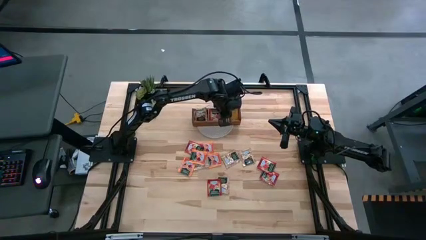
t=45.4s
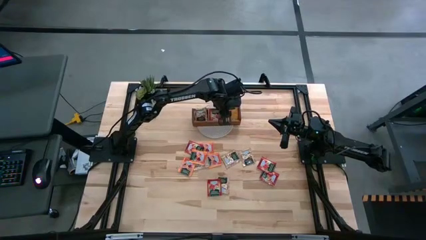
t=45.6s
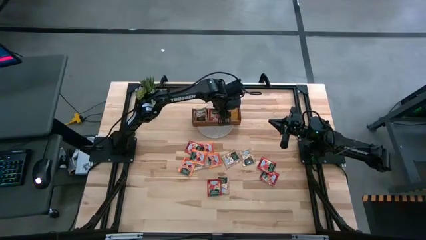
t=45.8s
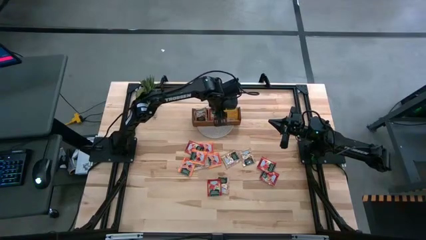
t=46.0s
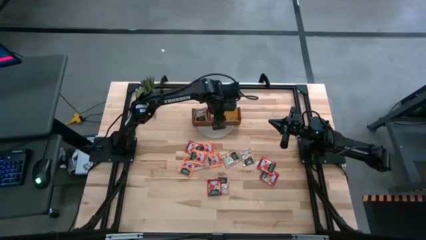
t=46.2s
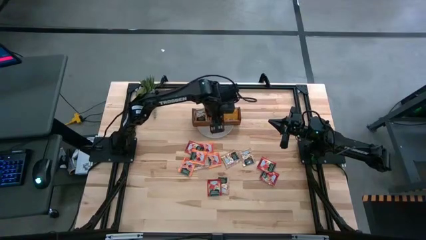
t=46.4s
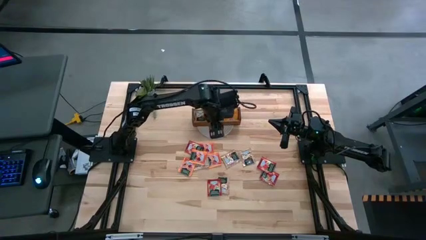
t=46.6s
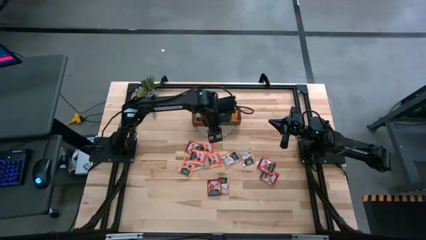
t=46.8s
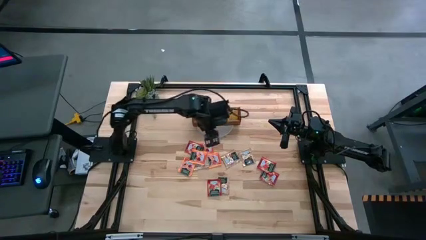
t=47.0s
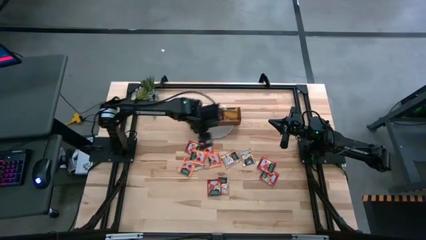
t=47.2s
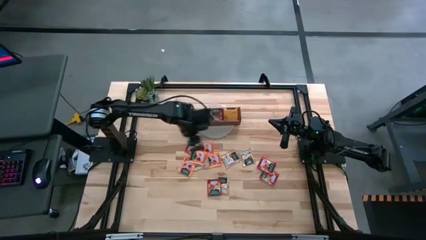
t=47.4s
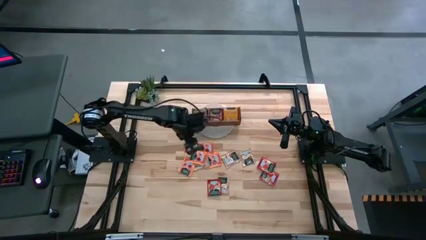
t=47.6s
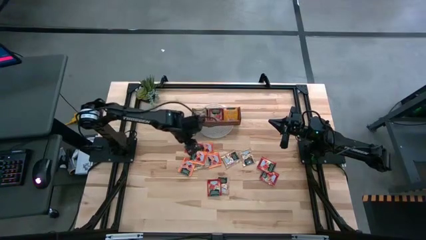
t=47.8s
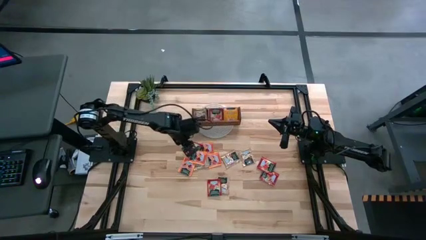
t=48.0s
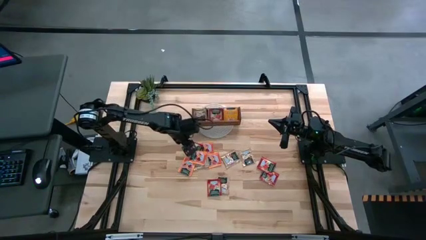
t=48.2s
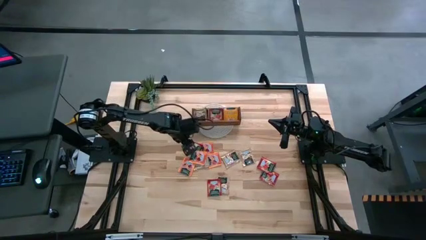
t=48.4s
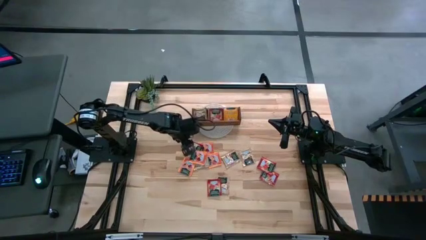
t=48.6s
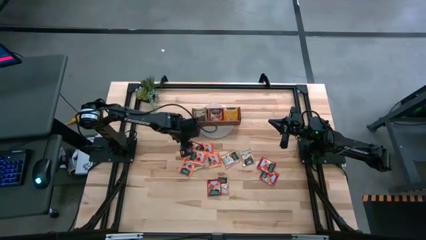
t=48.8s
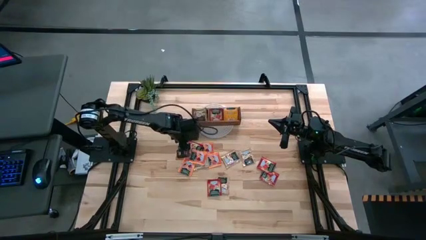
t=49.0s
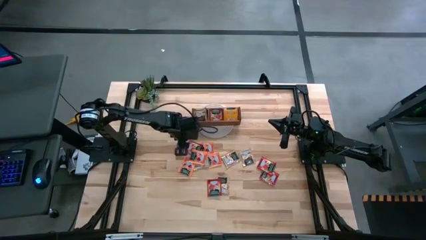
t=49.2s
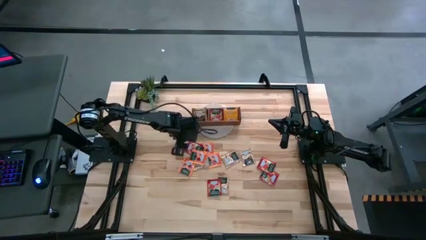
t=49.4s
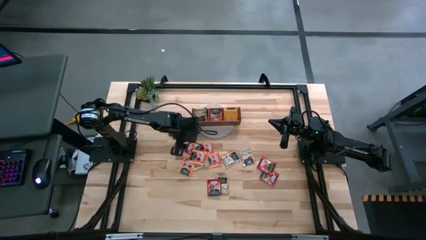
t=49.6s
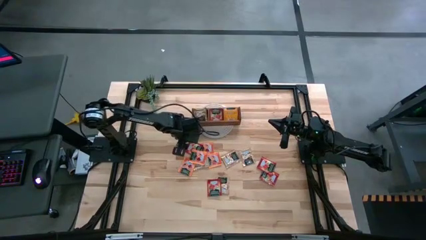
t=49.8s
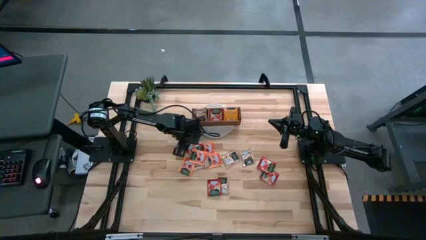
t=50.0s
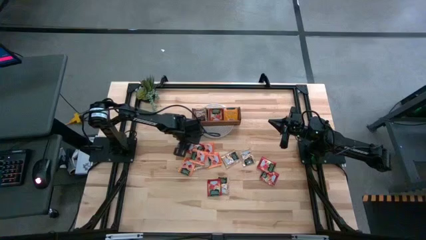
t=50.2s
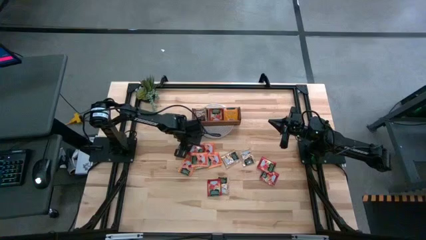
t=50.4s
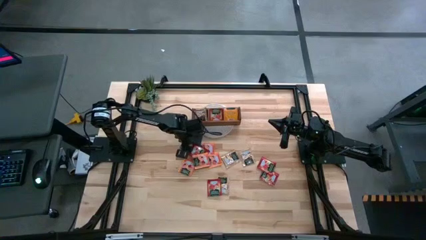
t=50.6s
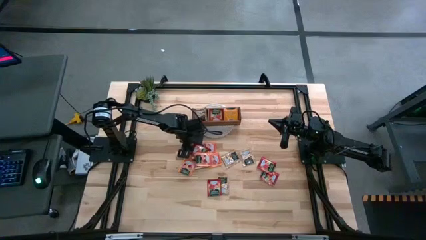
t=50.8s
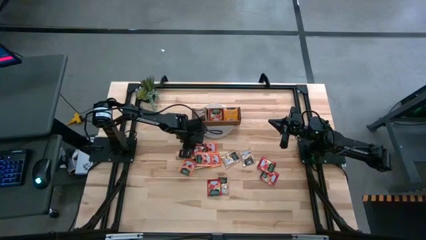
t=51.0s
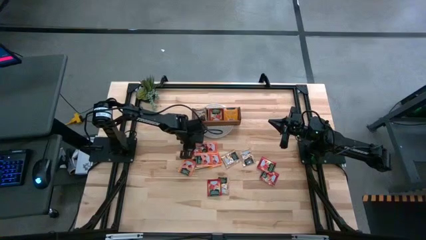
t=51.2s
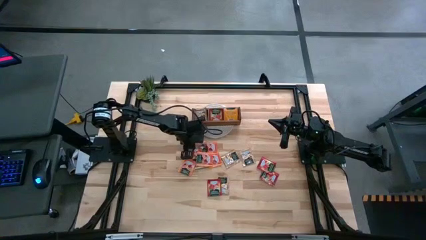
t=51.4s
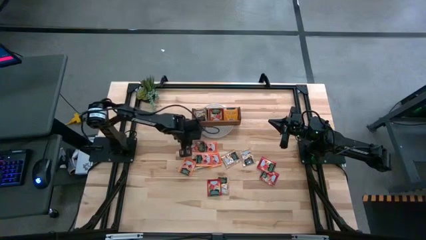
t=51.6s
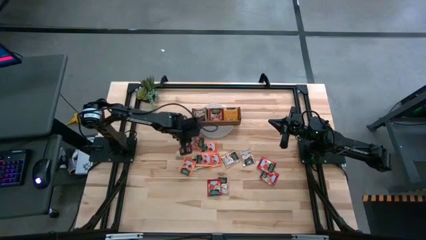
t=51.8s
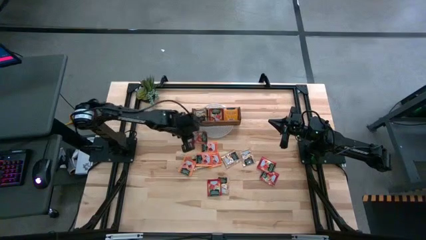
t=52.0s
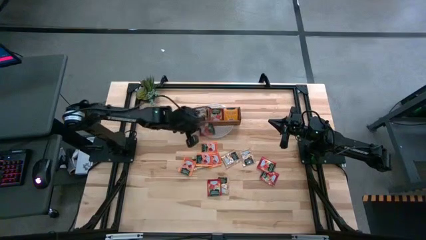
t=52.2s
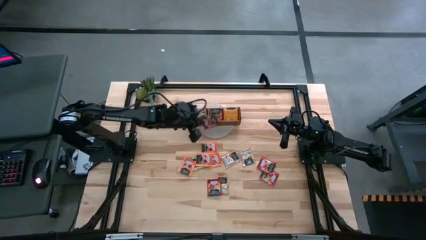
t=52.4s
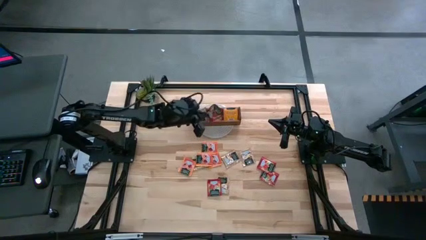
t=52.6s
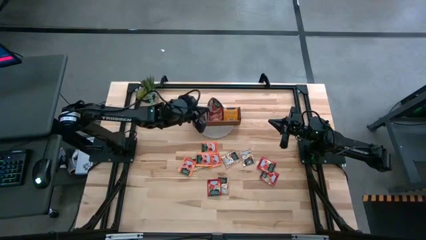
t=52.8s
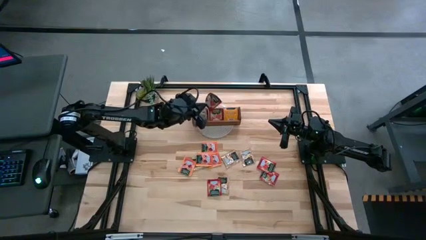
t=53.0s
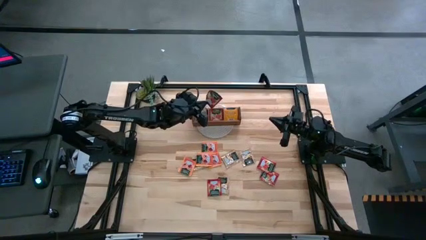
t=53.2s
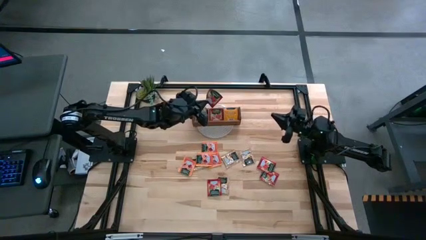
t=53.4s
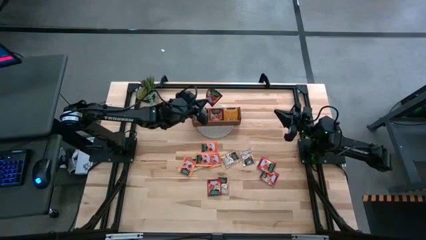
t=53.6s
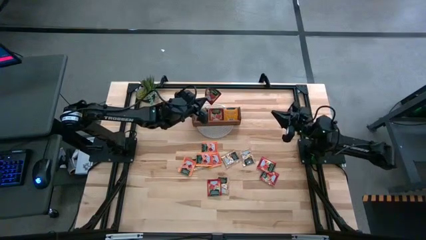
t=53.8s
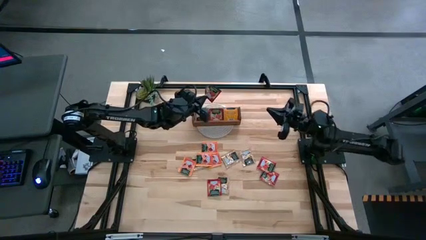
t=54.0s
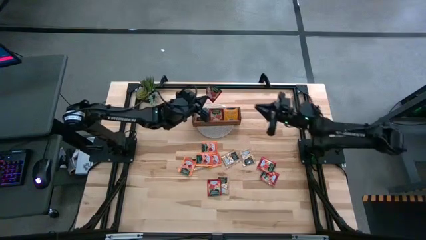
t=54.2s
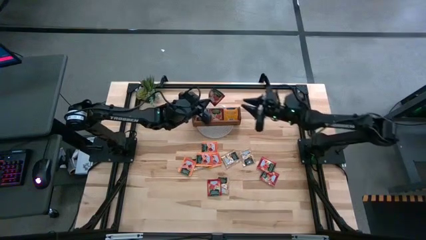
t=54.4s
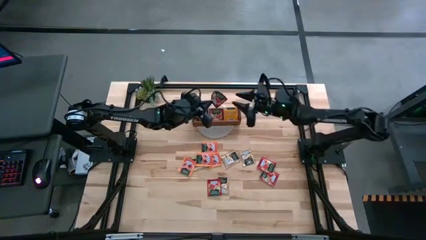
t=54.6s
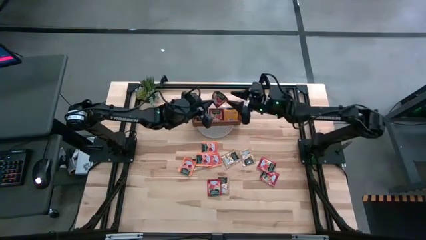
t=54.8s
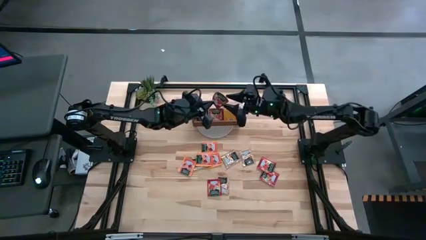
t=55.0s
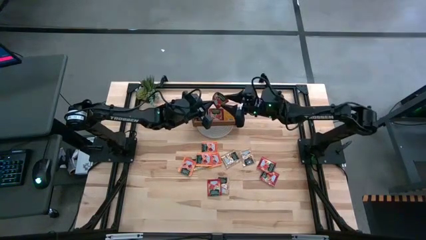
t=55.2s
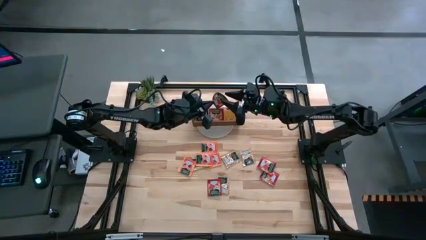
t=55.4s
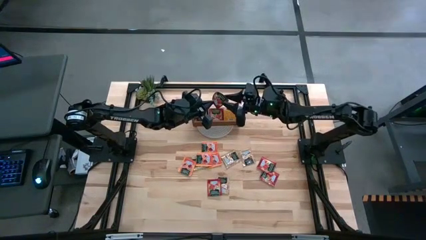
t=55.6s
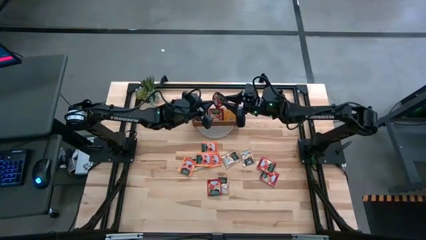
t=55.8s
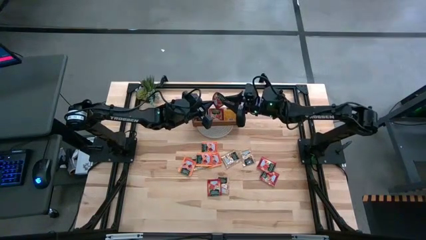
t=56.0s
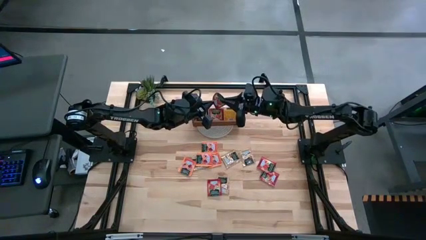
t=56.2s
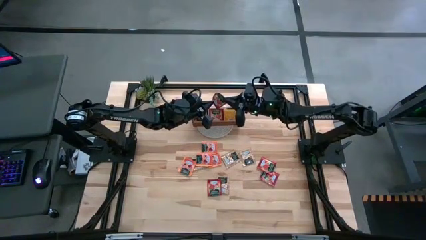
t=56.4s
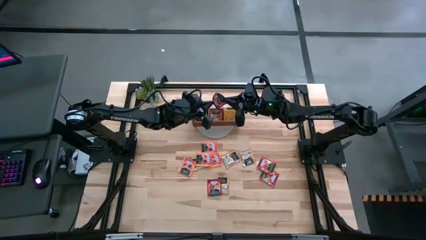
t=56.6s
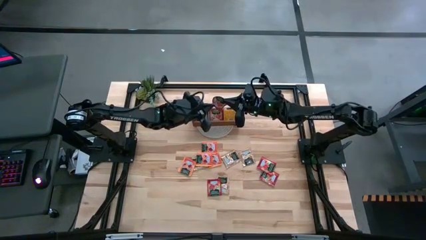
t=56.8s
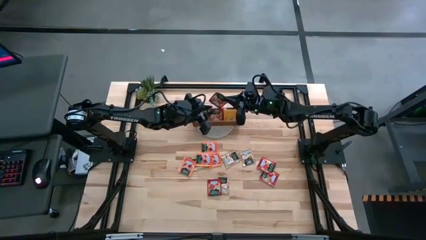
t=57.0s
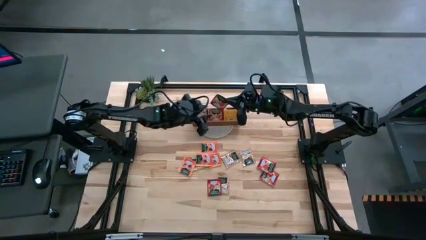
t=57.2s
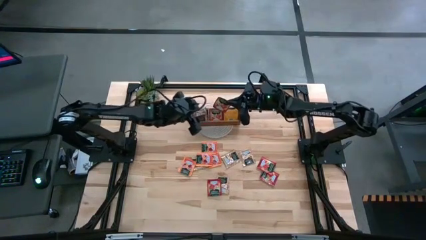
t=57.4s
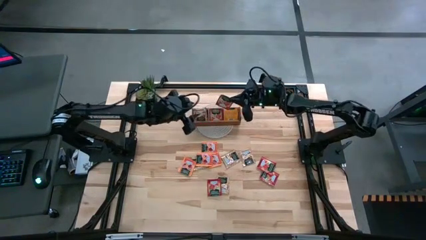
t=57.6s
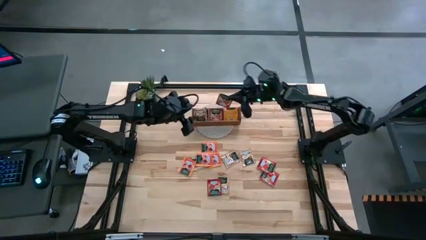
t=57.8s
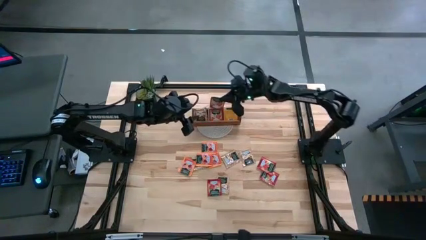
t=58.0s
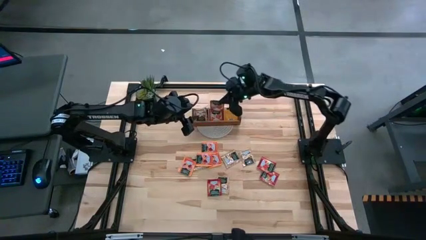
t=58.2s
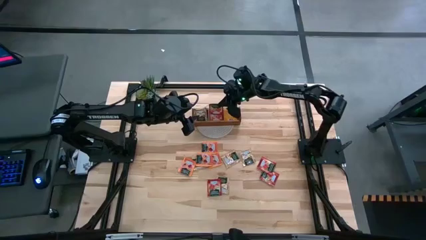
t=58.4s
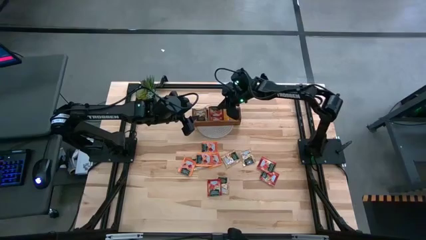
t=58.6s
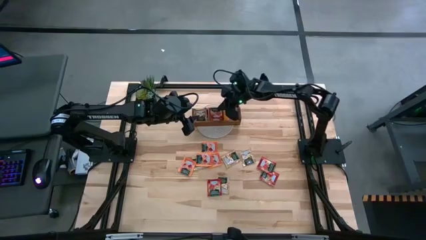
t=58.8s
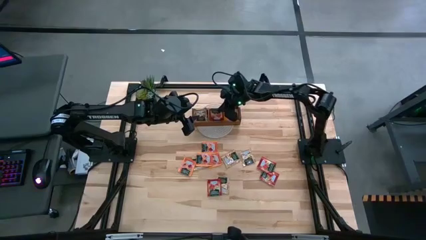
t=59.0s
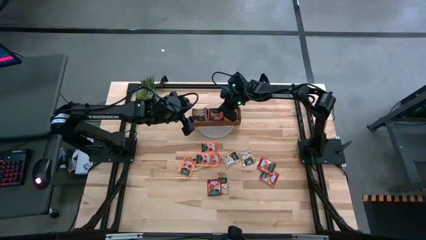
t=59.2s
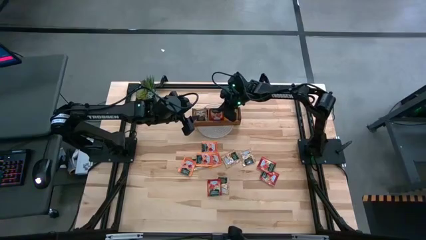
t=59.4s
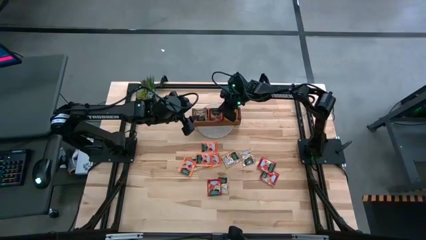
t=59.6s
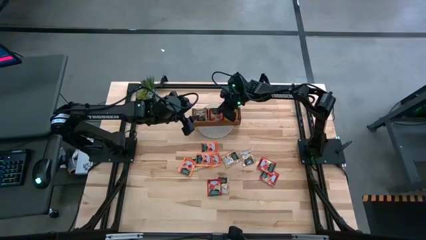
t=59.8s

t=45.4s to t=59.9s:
Task: Pick & Place Tea
Put the red tea bag in the middle section of the wooden organizer

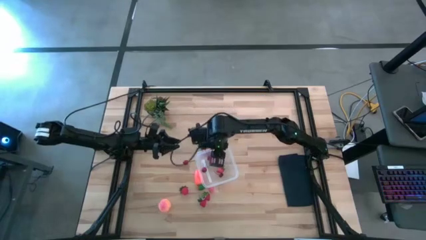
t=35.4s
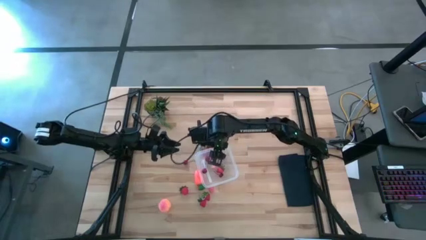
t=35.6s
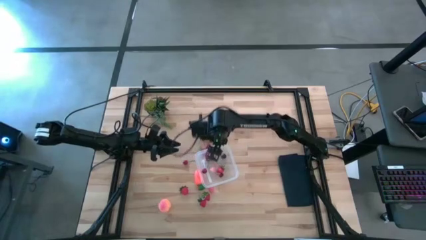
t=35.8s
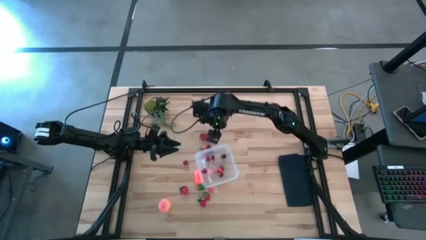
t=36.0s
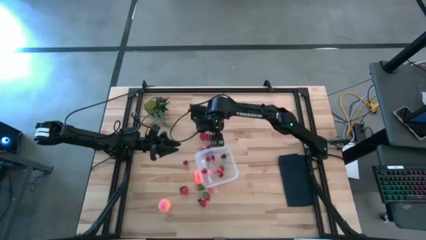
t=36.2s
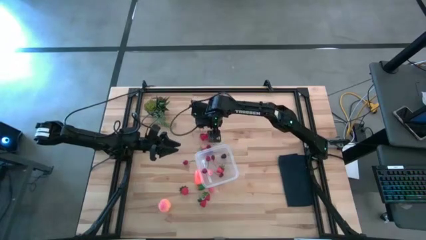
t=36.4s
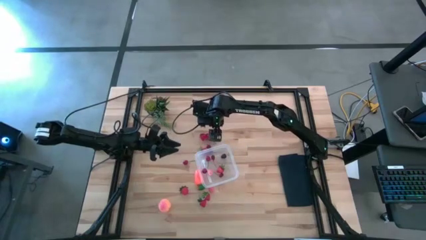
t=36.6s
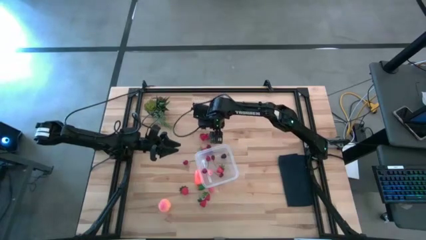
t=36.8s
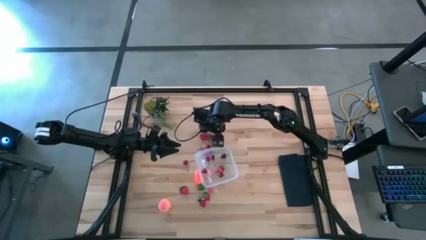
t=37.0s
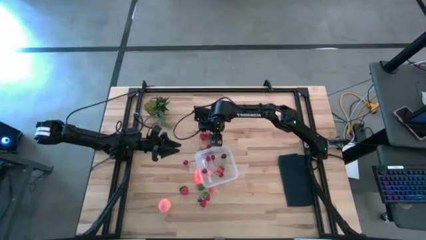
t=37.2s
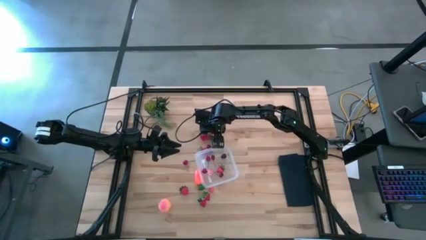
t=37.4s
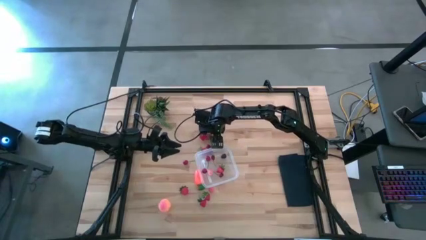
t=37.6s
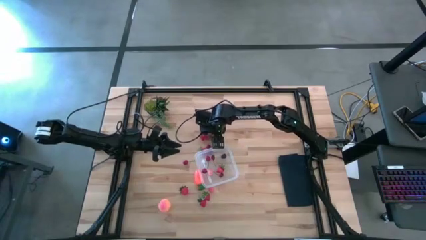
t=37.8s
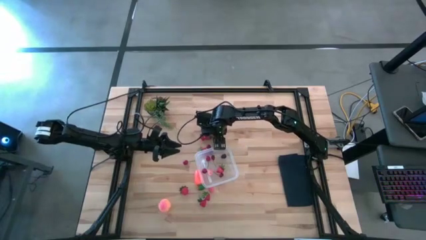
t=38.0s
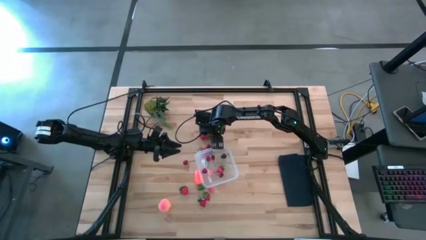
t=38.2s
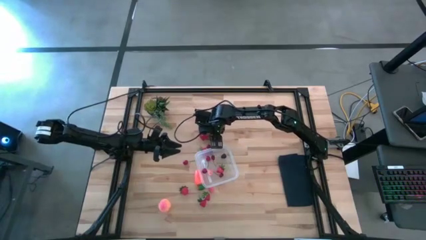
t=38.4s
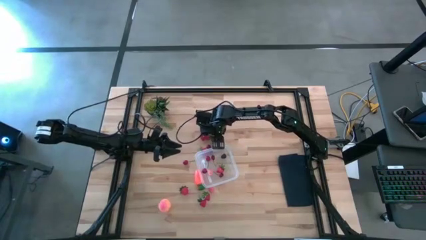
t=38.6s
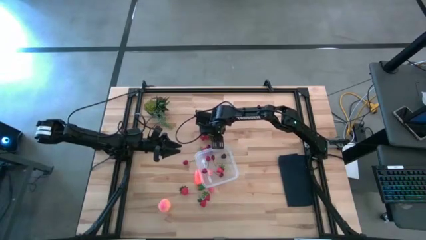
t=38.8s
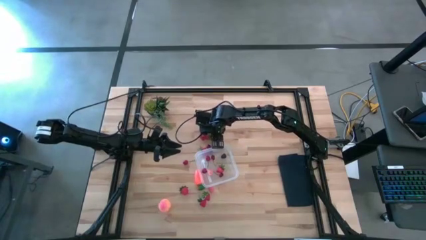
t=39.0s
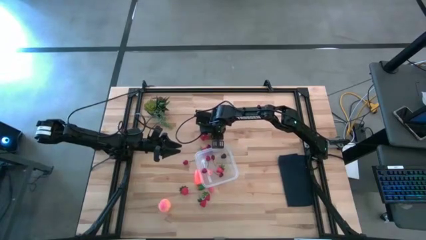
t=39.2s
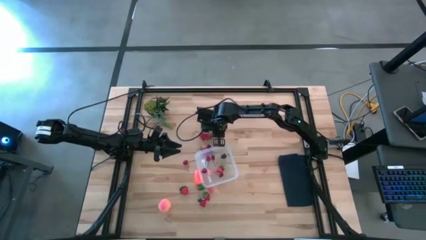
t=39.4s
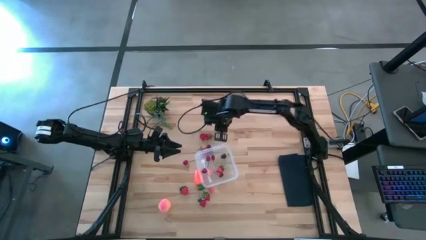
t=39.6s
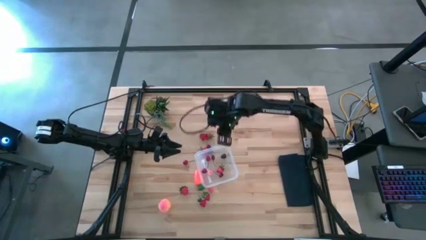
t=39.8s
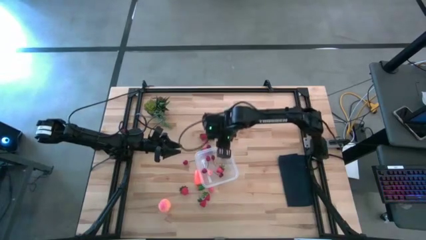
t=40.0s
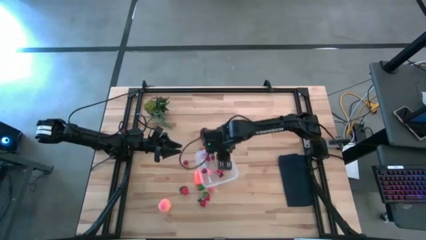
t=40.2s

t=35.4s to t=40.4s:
Task: Pick and placing Produce into tupperware
Put the cherry into the transparent container
